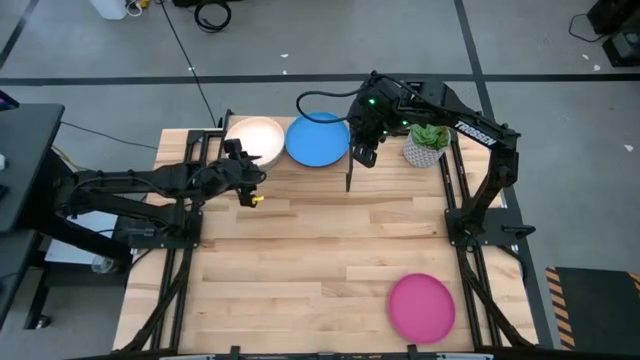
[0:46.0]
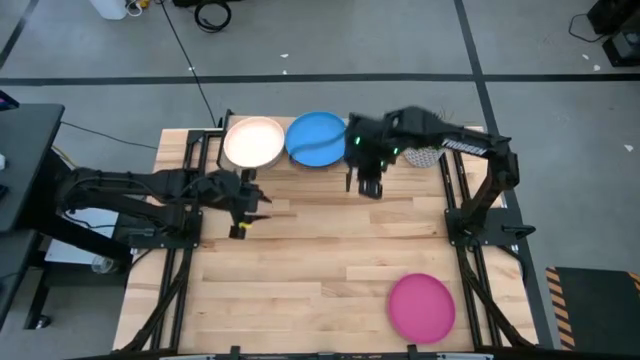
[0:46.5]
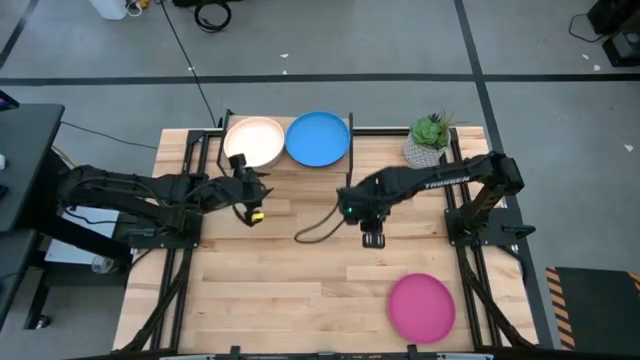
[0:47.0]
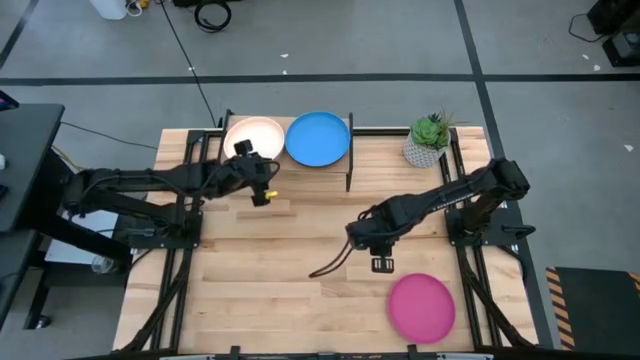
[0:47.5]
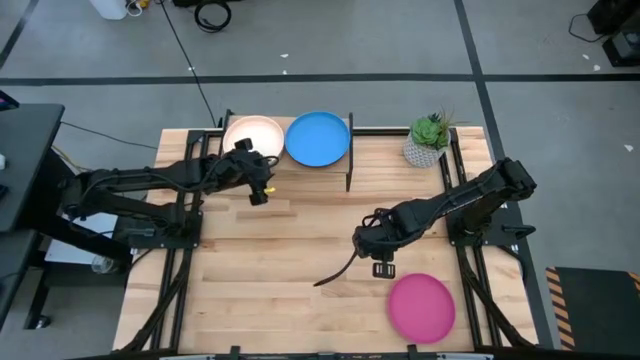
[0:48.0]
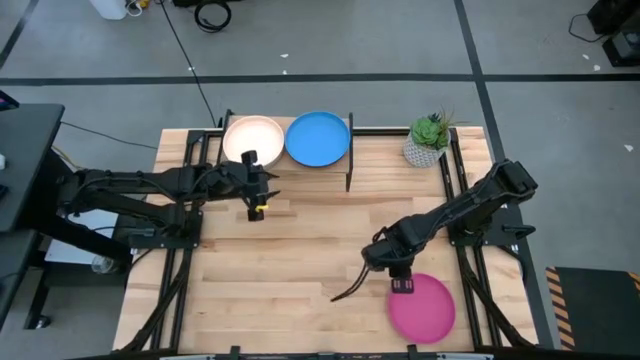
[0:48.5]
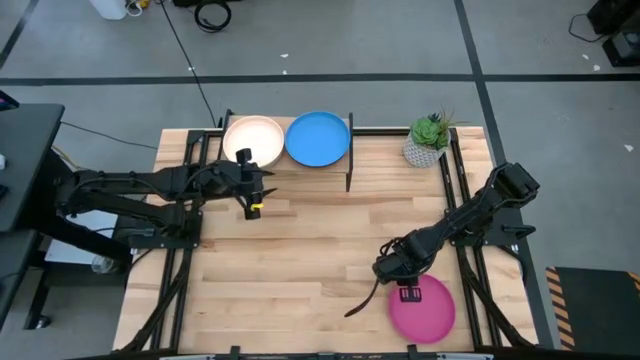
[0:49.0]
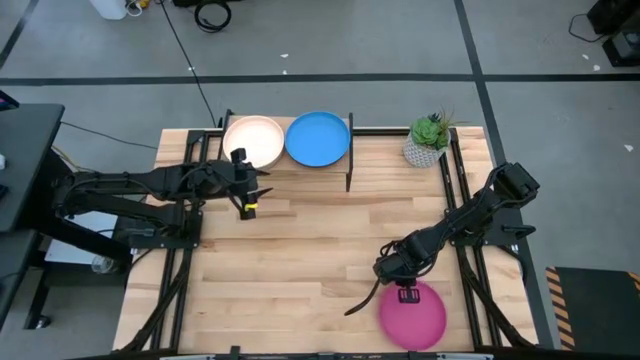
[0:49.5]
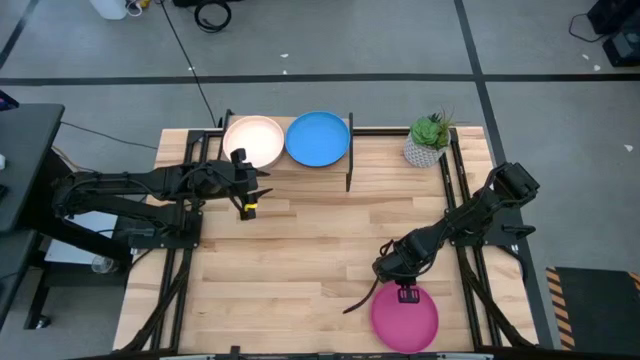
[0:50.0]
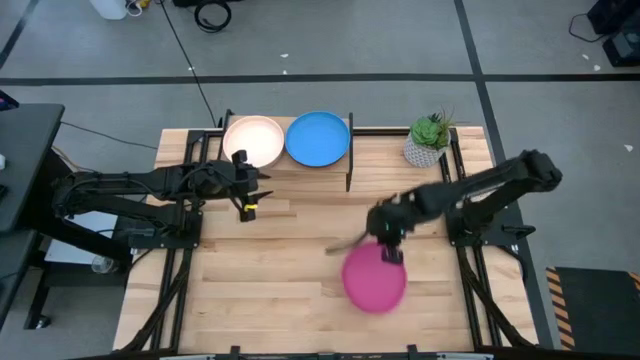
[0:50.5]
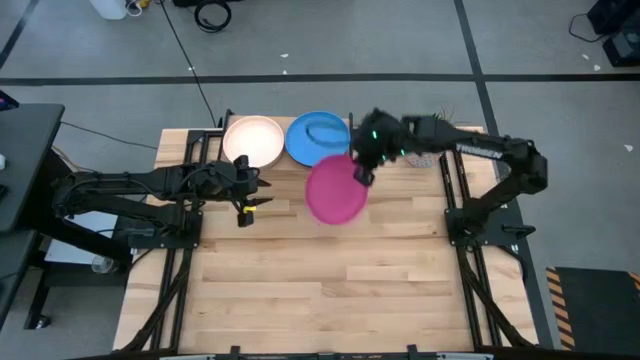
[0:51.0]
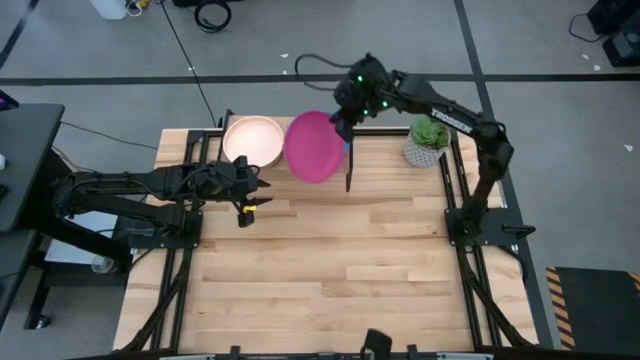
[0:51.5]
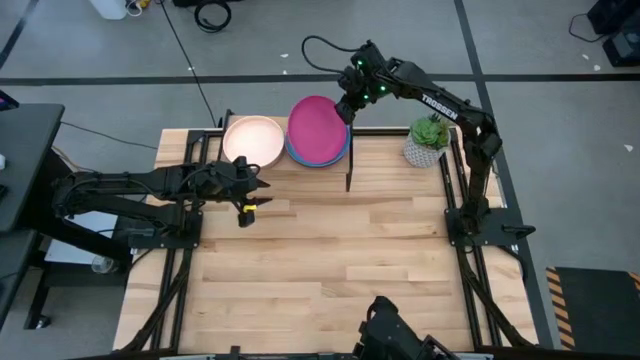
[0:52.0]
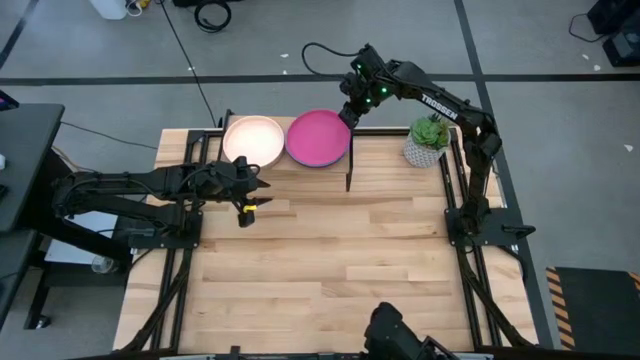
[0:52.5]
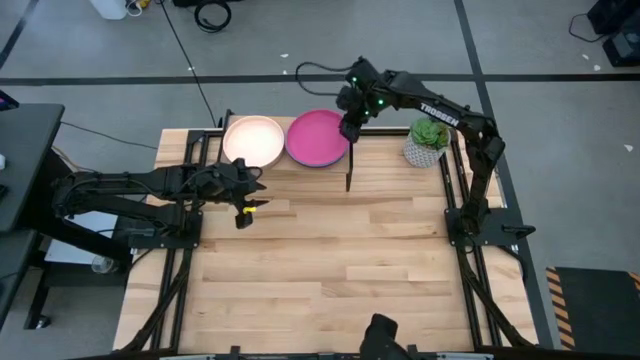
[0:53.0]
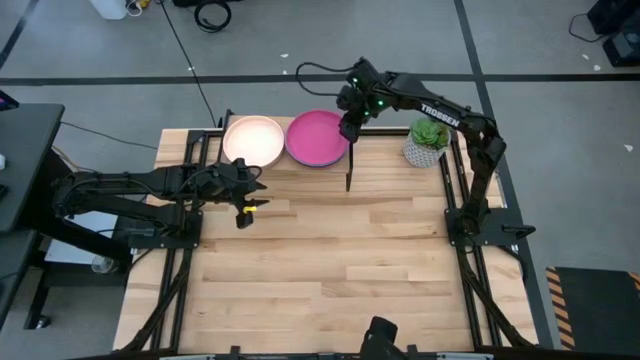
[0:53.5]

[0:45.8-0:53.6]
Task: Place and stack plates onto a shelf
Stack the pink plate on top of the blue plate on the shelf

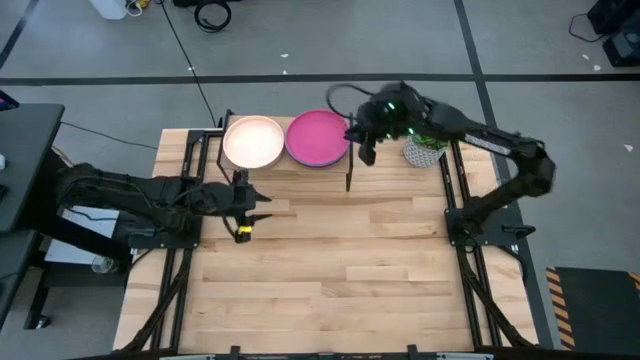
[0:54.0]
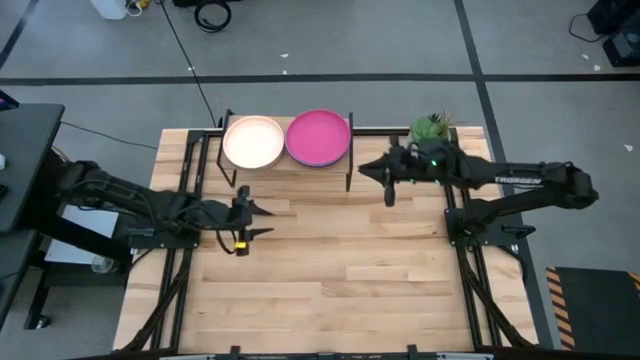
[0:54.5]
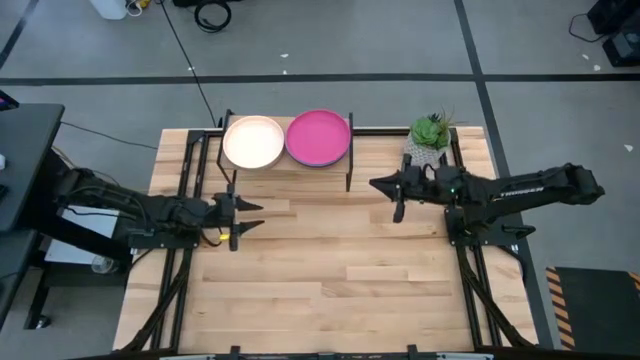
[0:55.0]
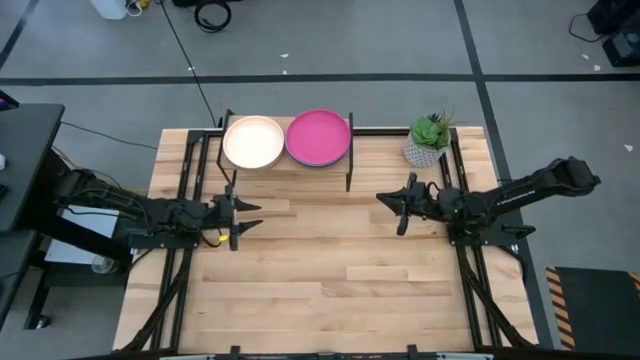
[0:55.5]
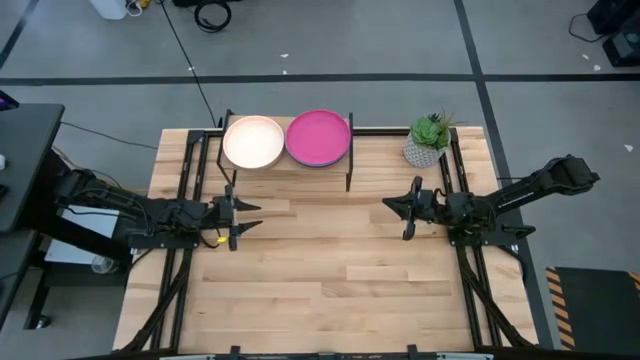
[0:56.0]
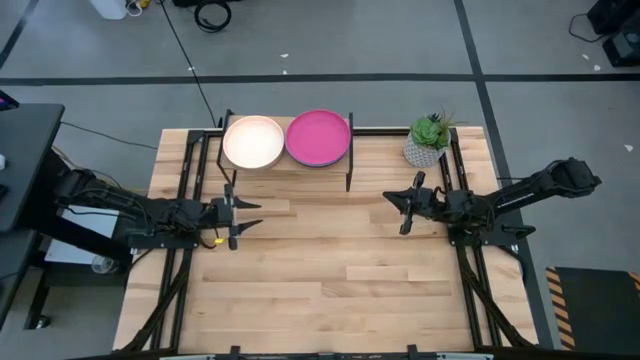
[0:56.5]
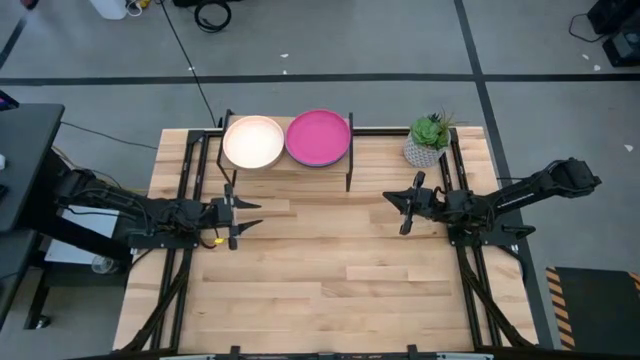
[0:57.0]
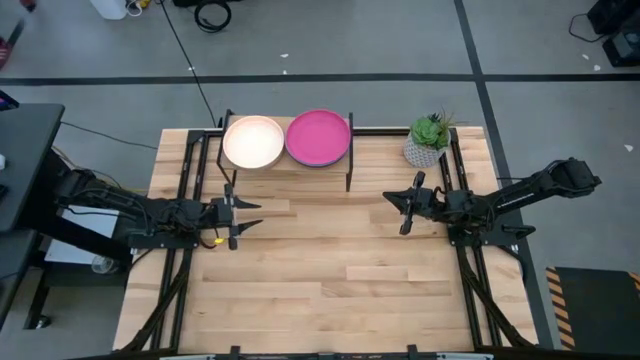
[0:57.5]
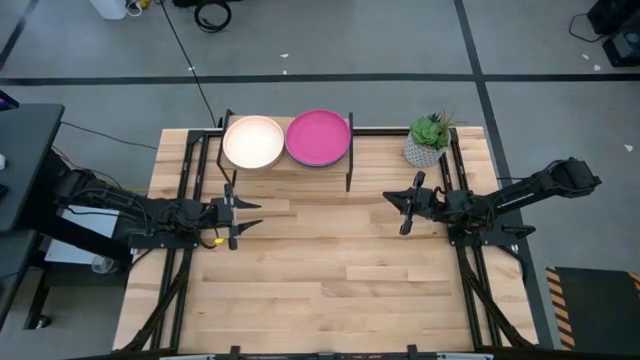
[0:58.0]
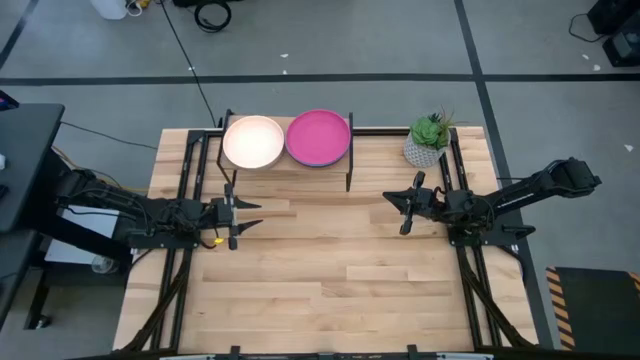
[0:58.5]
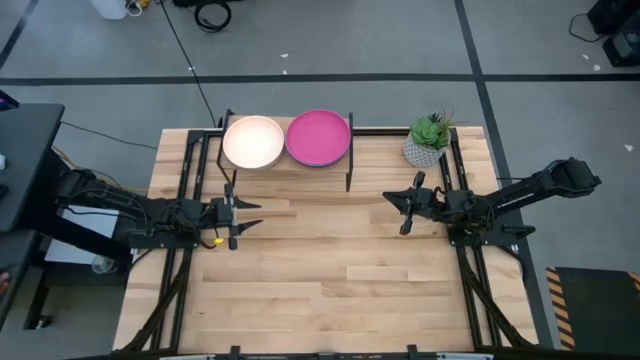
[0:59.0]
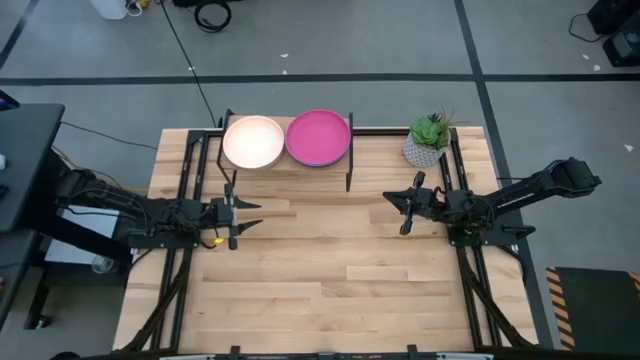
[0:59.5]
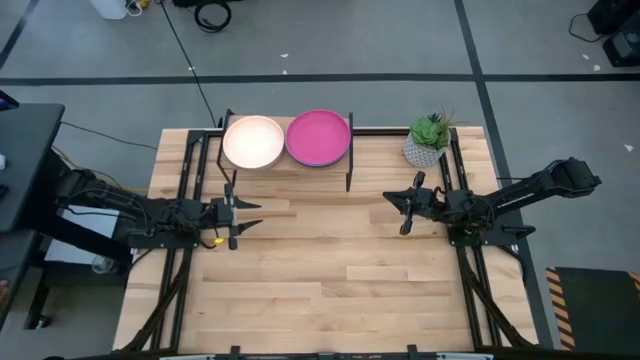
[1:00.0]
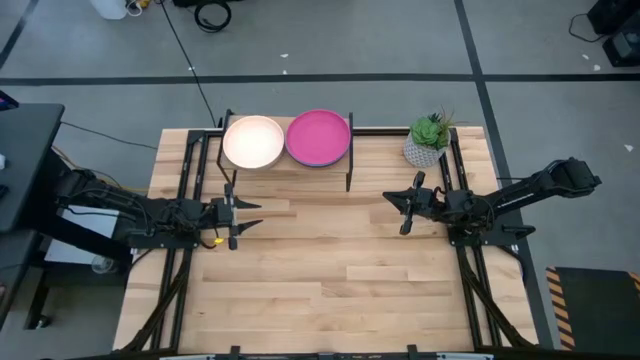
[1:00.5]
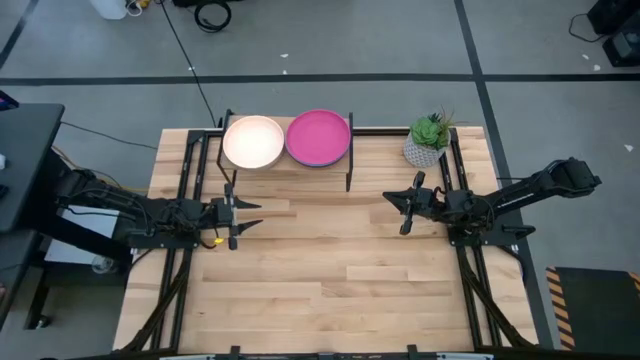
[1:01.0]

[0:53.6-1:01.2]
Return to Home Position

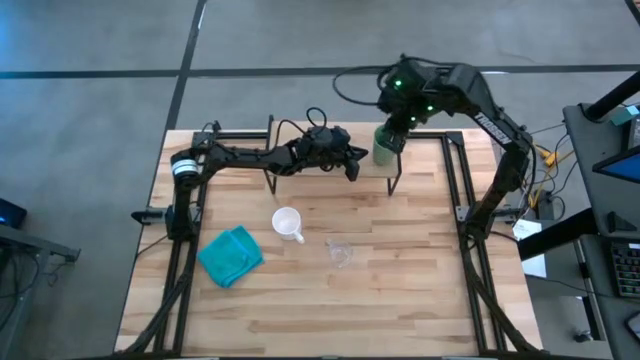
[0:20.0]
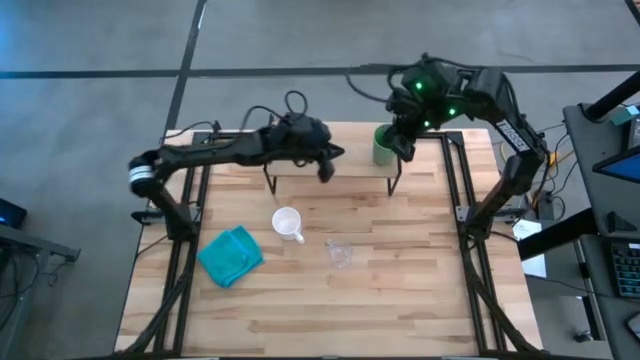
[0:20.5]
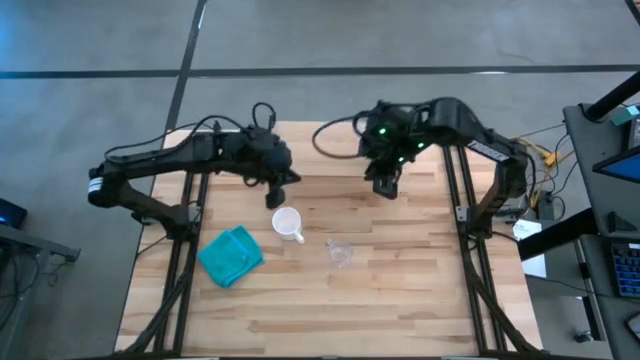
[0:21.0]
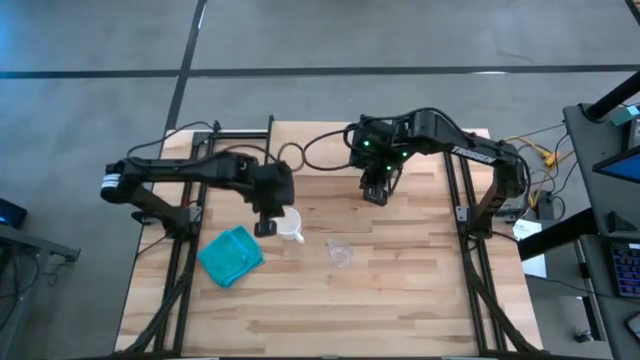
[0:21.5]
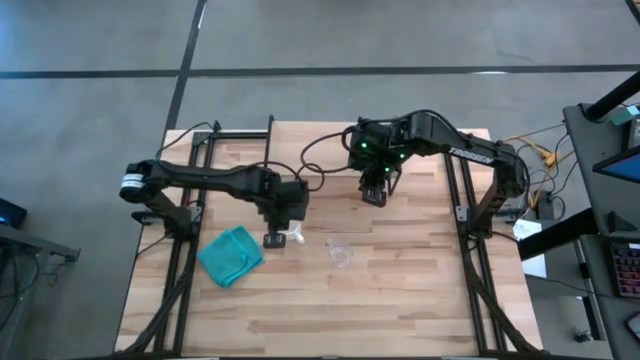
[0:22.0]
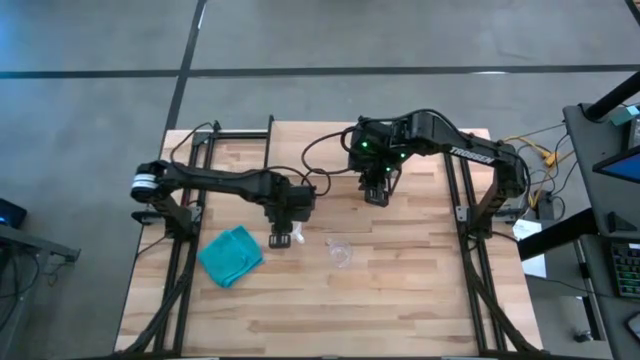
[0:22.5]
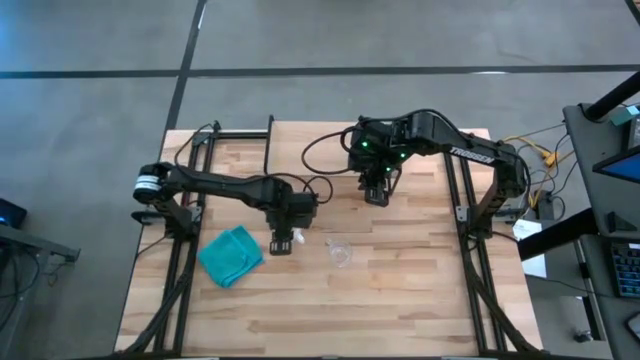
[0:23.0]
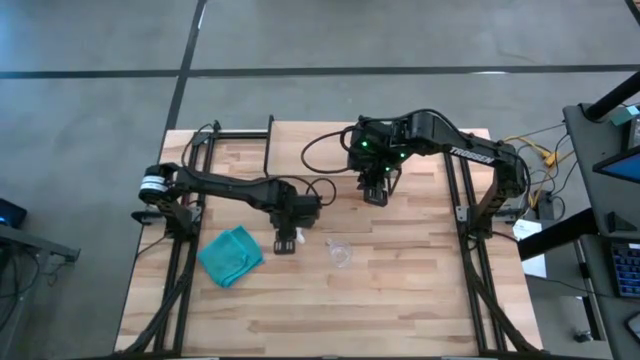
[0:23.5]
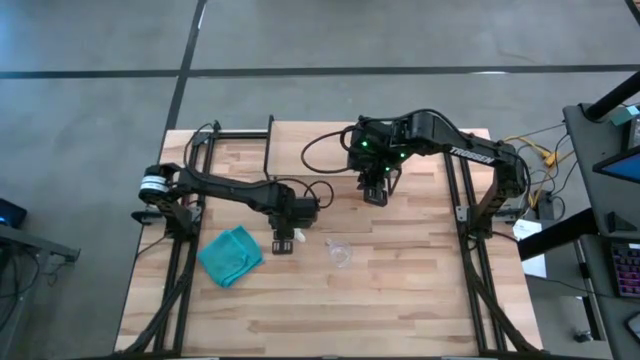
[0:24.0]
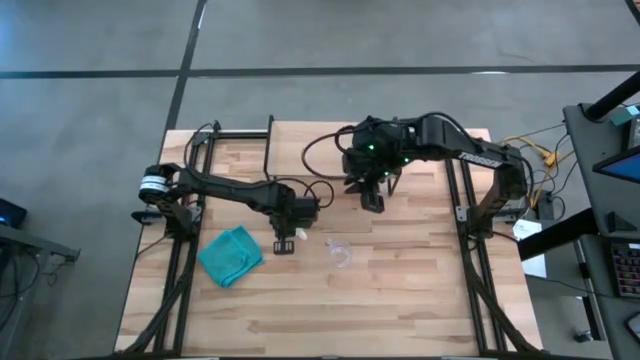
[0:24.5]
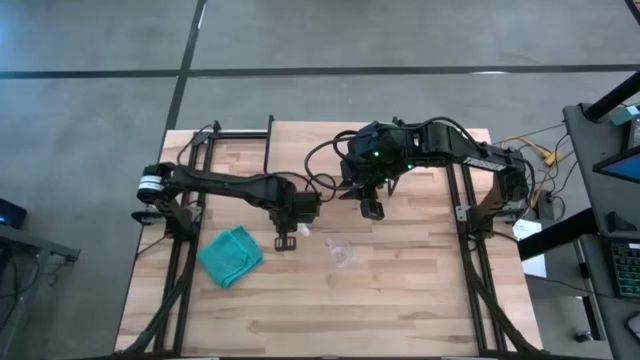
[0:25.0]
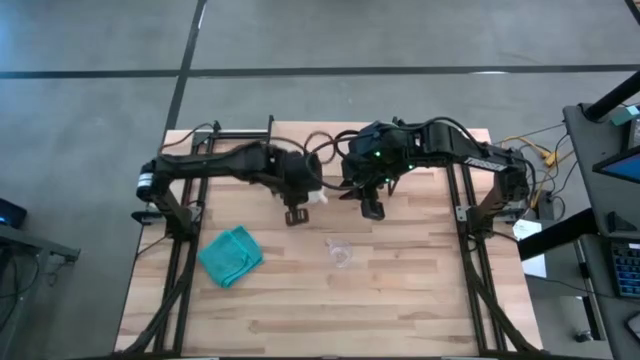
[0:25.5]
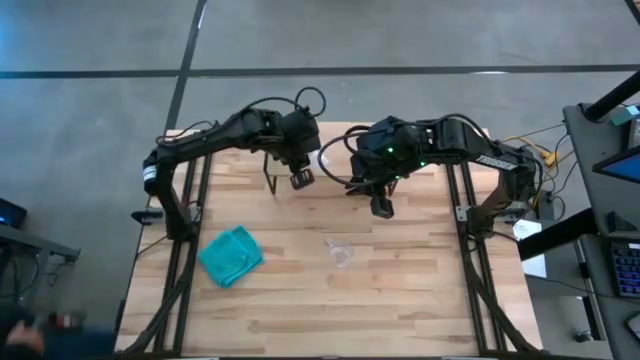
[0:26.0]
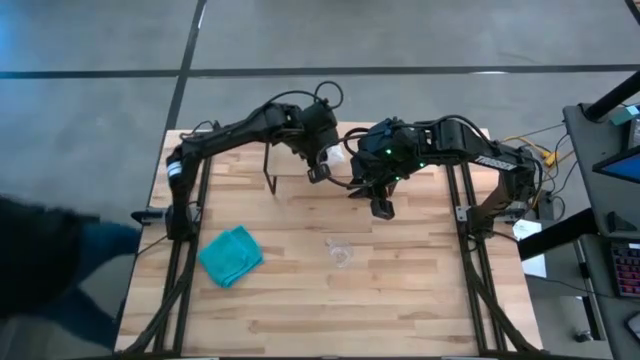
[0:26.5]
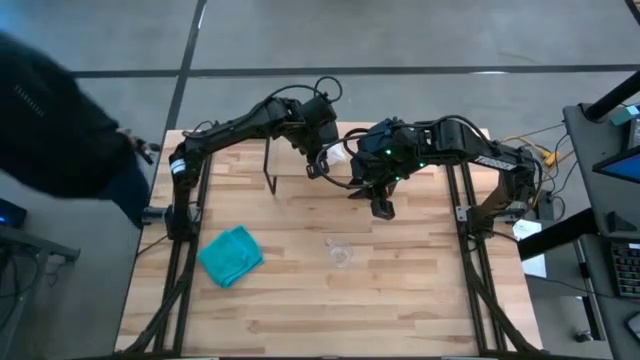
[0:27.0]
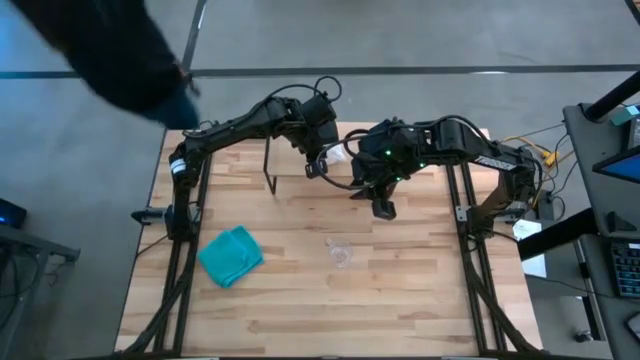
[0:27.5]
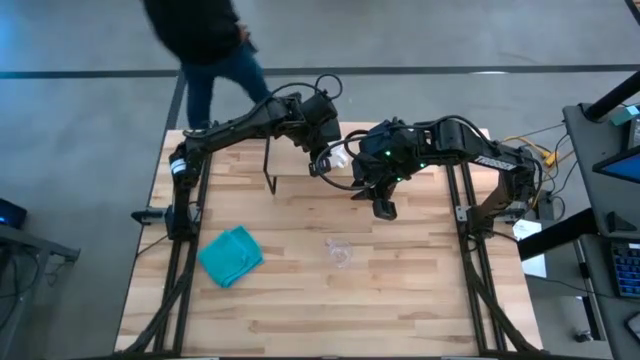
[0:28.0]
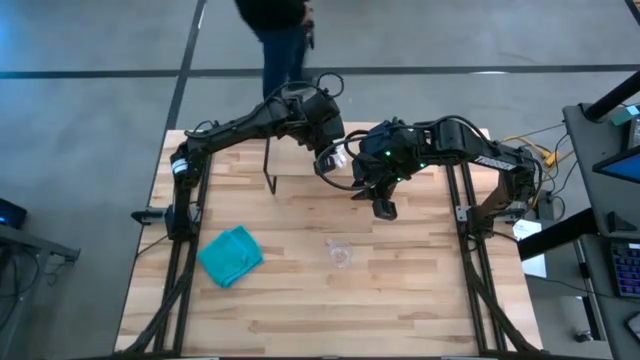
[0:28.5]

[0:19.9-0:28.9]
Task: Stack small to large cups/mugs on shelf
Put the white mug on the shelf
